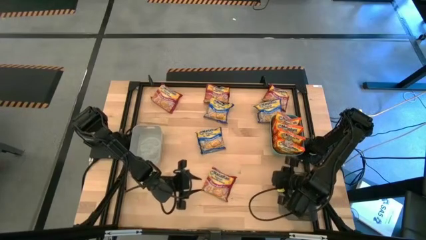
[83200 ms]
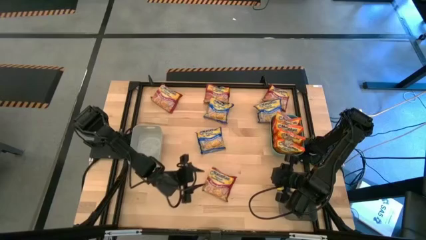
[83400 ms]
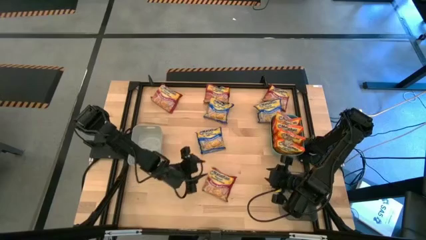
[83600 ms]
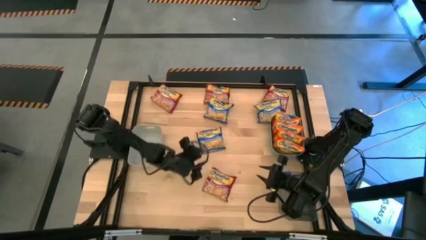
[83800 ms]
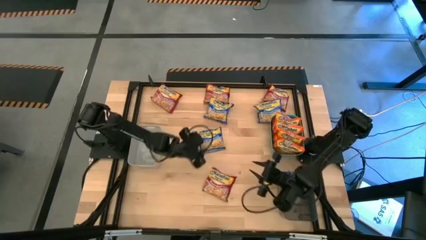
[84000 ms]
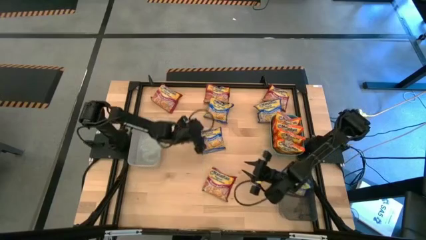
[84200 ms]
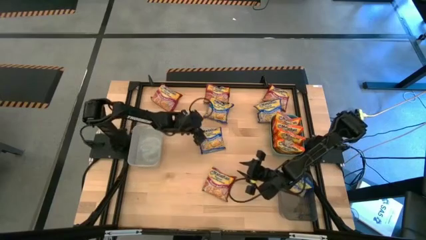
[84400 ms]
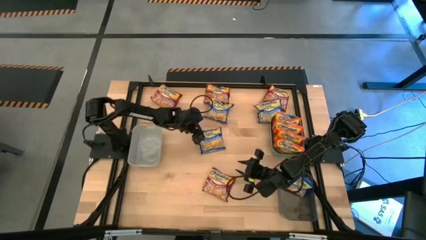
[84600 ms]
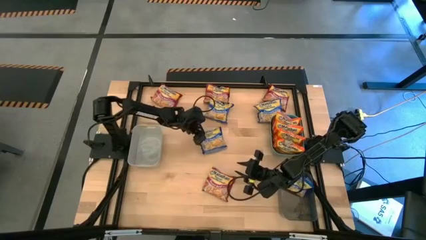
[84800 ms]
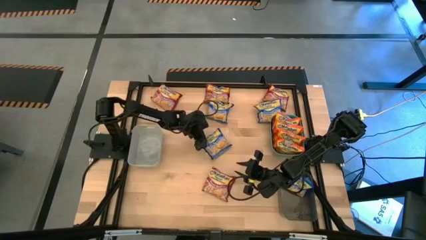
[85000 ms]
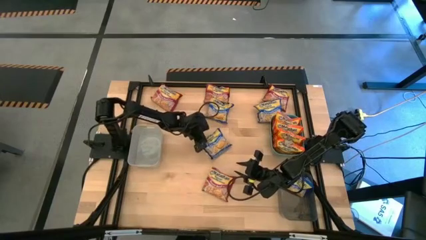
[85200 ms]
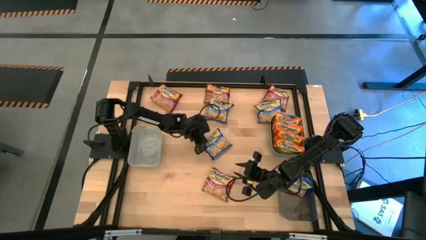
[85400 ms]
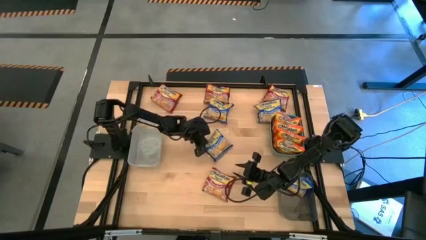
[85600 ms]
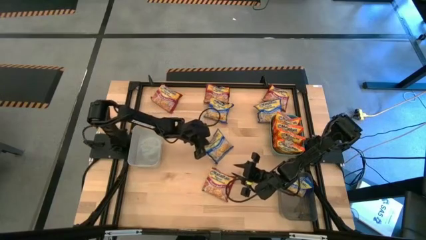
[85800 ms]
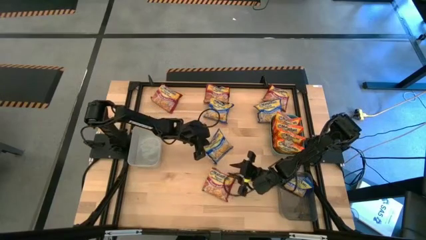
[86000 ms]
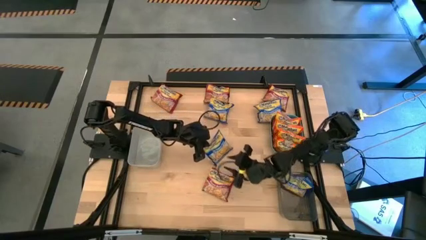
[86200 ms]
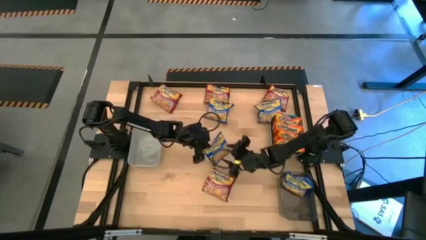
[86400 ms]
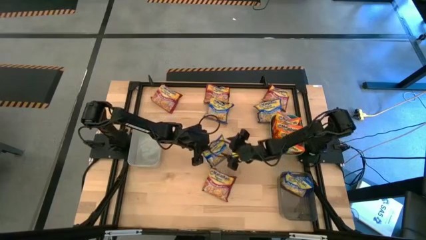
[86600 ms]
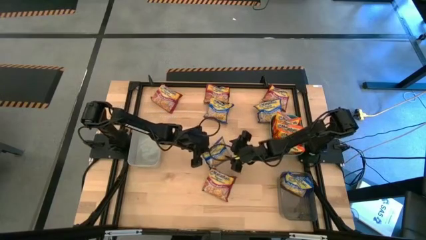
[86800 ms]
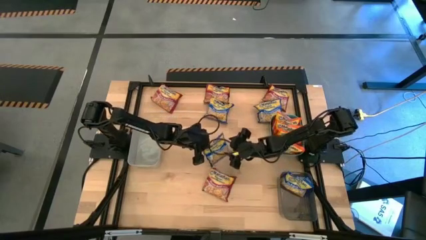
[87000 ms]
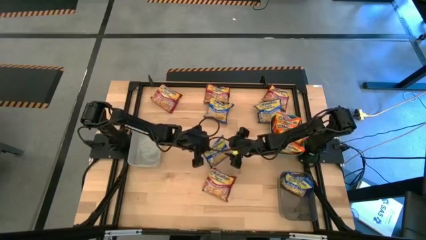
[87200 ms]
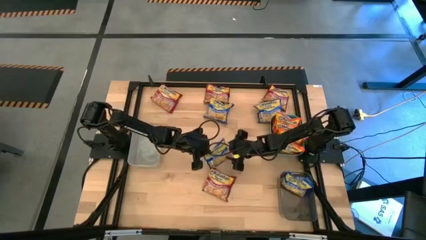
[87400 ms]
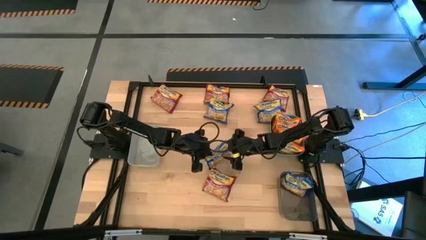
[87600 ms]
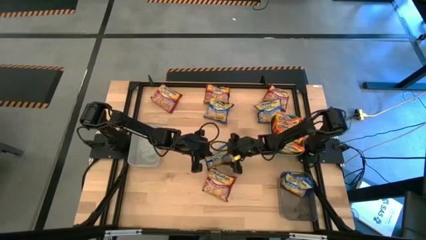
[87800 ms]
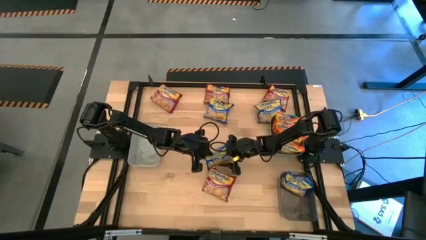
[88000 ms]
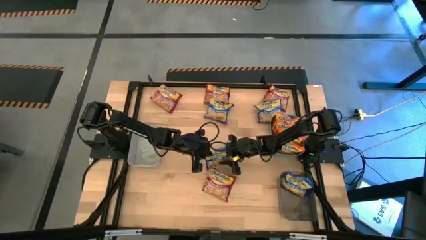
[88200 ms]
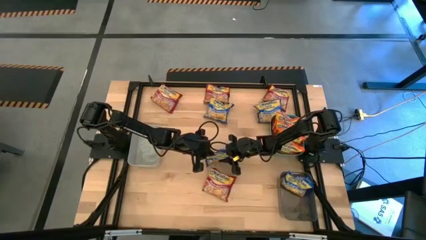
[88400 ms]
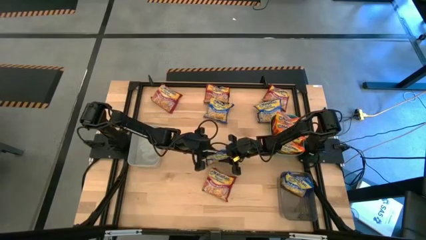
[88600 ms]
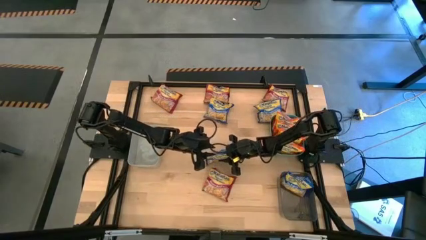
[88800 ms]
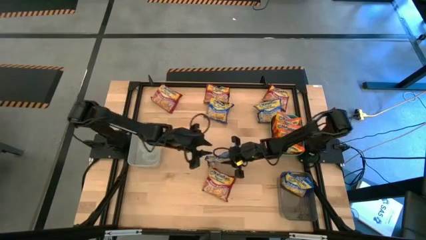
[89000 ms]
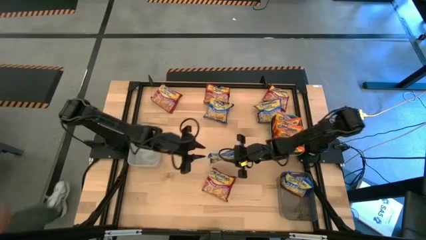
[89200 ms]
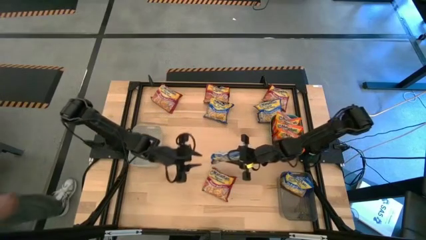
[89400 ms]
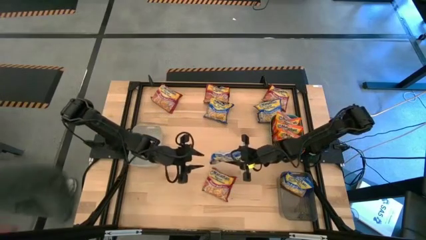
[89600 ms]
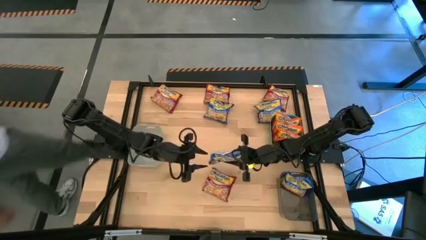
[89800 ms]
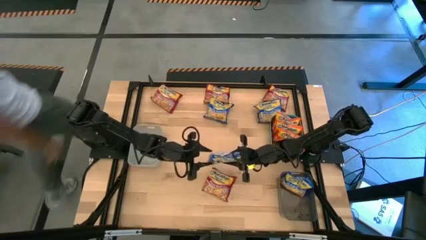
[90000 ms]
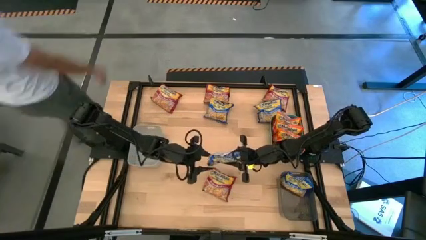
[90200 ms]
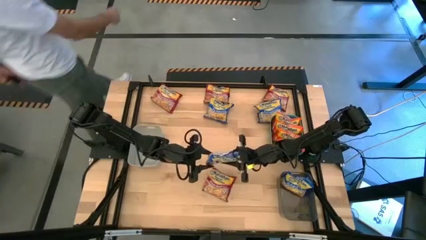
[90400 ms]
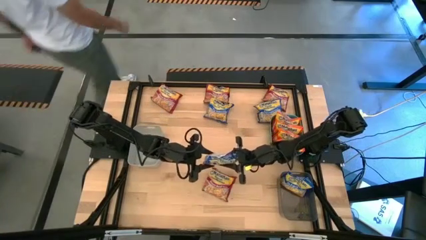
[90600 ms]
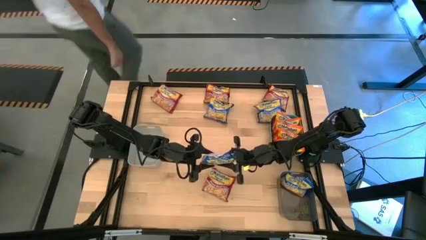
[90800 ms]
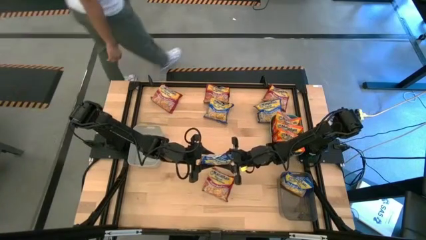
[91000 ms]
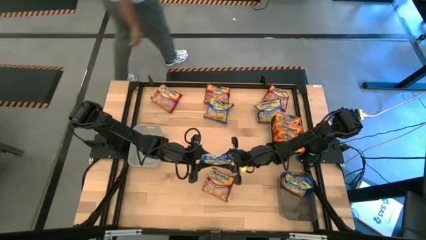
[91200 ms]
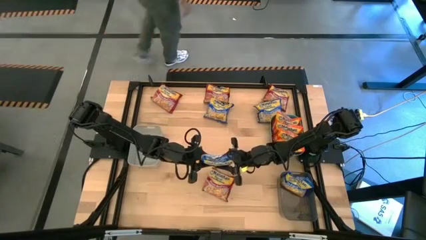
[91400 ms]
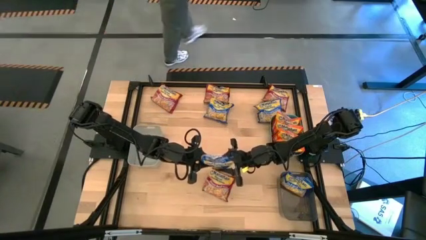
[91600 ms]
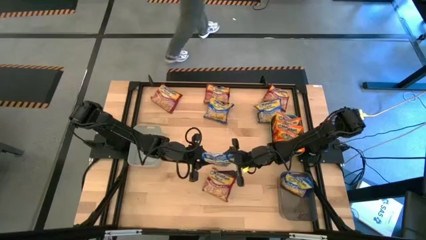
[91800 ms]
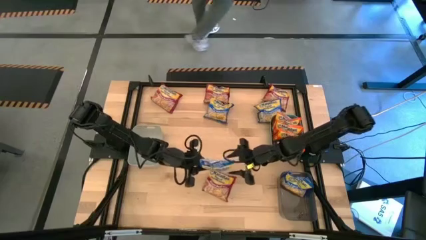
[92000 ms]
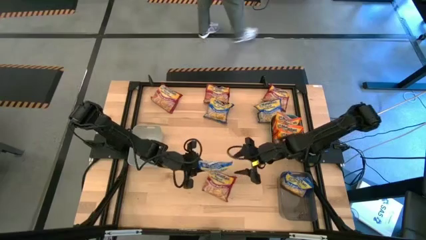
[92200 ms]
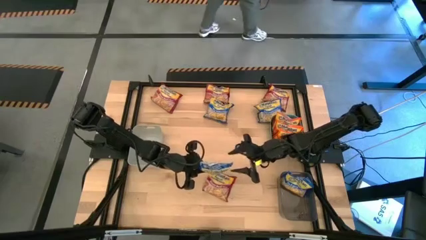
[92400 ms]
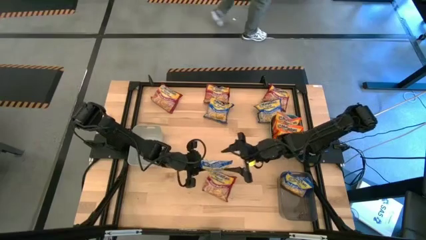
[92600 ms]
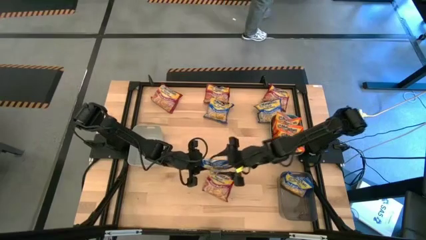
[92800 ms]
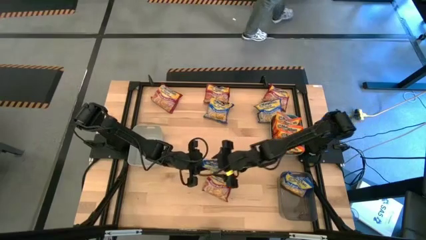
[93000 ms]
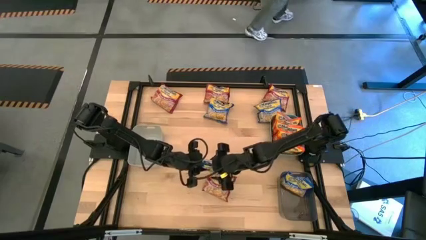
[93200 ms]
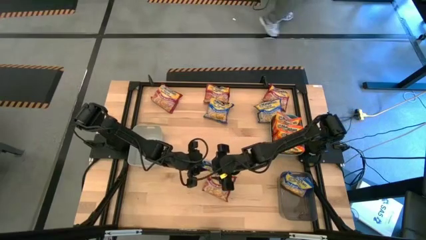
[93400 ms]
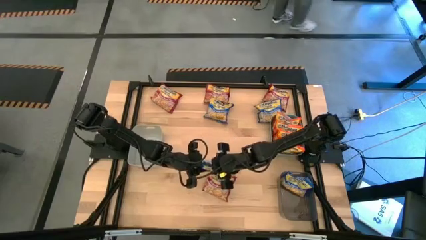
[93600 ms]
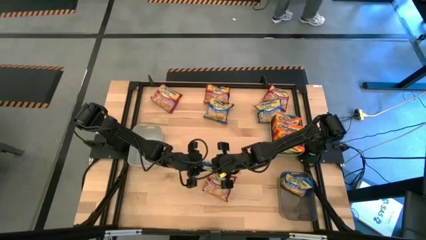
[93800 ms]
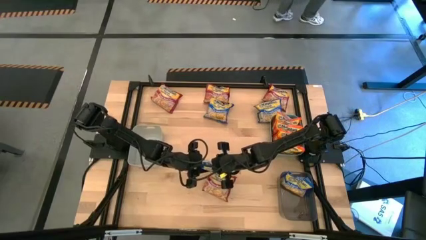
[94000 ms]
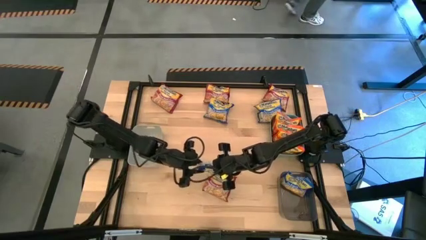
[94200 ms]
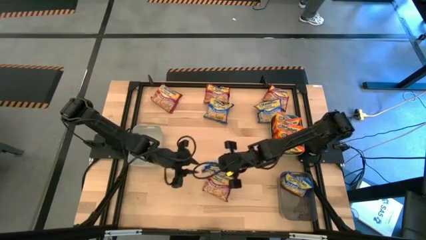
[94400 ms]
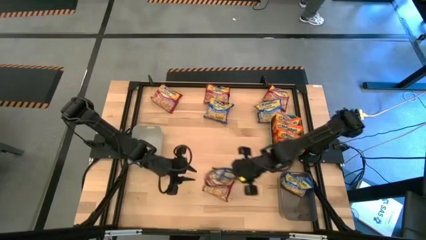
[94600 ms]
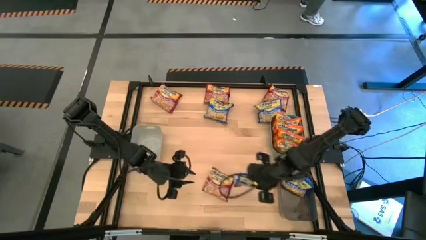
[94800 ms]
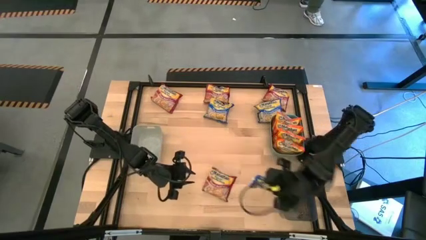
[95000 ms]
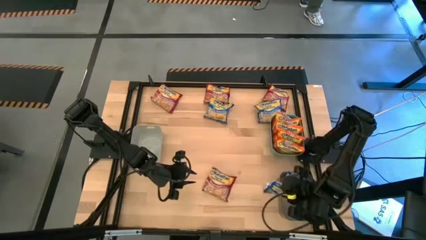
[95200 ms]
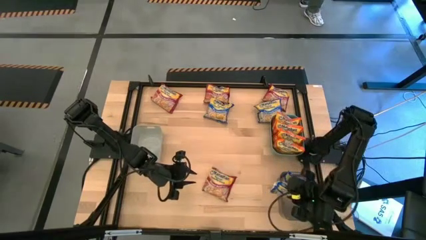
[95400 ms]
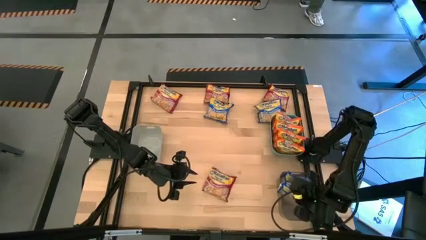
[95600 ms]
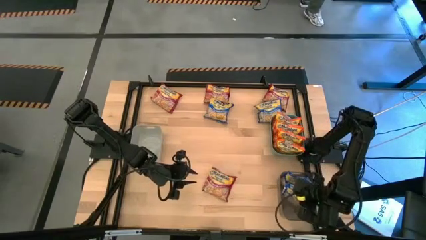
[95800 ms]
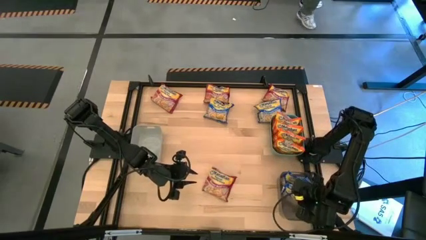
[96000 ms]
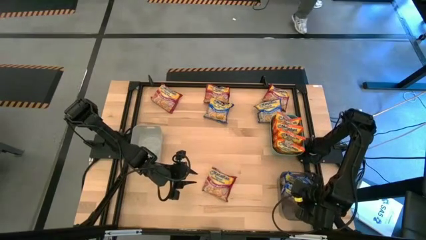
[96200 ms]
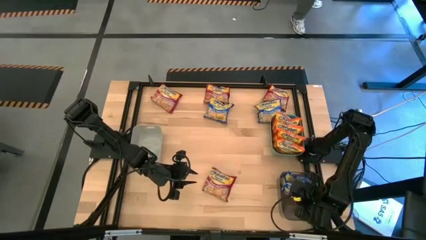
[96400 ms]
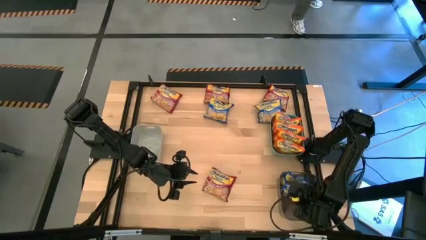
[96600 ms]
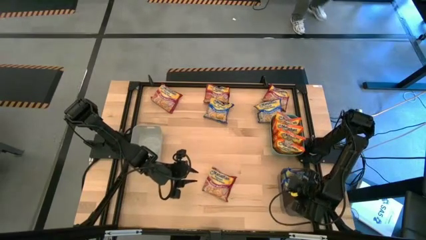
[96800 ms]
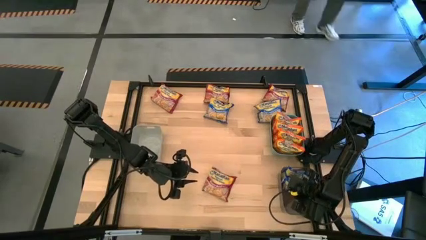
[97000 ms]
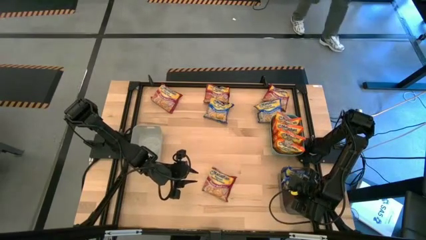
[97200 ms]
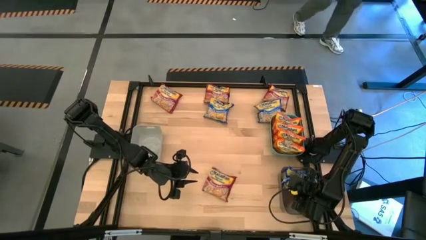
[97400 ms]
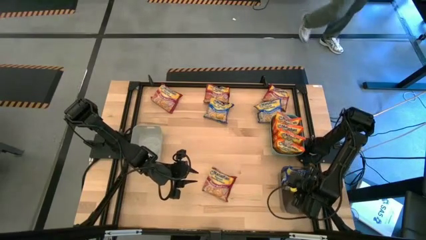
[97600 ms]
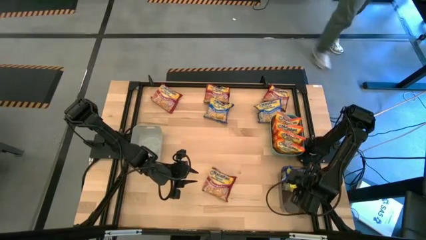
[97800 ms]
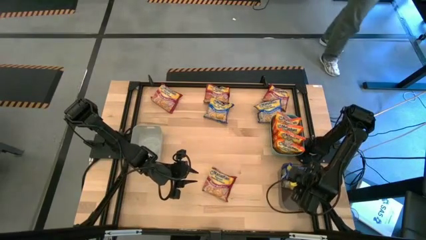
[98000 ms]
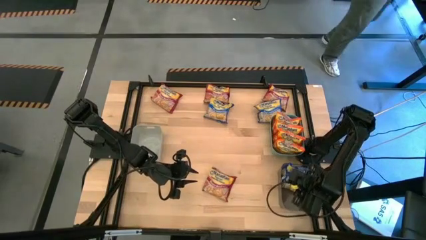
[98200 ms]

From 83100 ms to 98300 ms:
Task: Sort Maruchan noodles
Put the blue noodle pack into the black bin

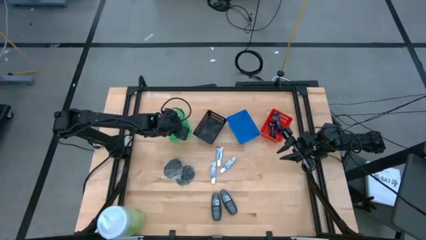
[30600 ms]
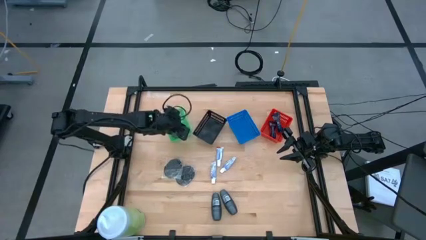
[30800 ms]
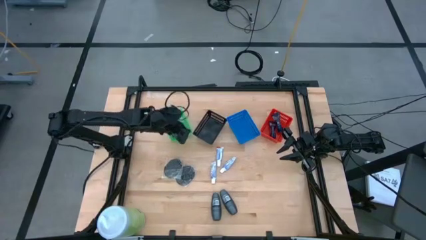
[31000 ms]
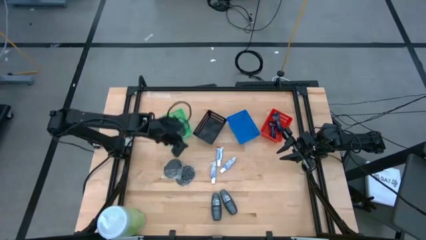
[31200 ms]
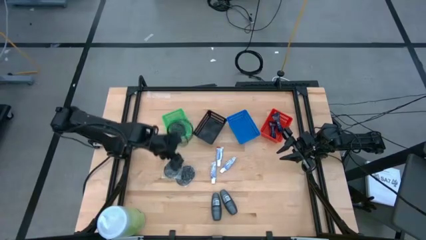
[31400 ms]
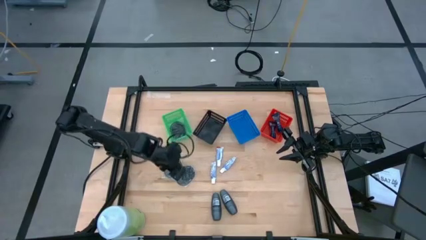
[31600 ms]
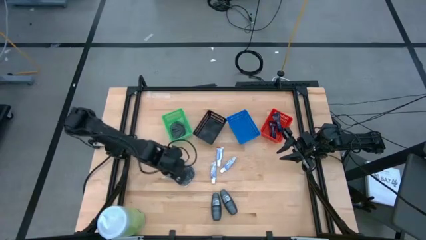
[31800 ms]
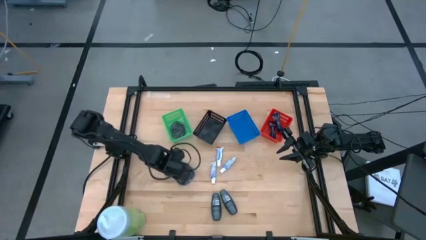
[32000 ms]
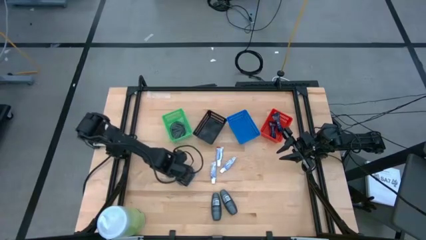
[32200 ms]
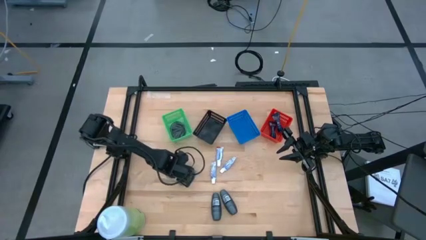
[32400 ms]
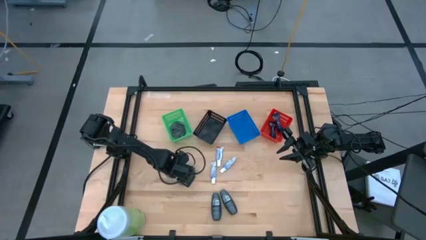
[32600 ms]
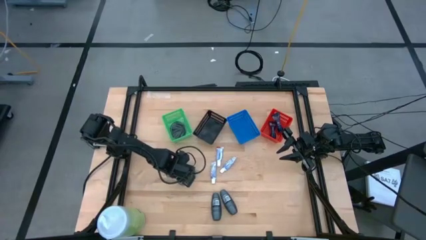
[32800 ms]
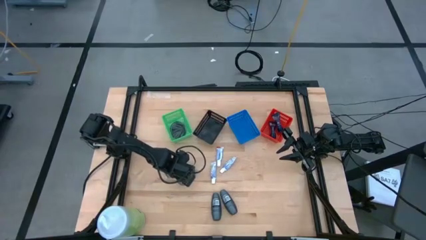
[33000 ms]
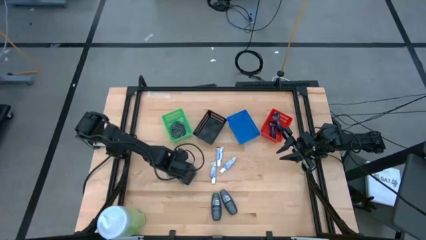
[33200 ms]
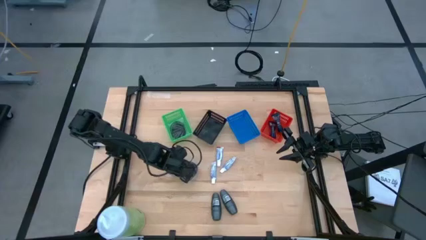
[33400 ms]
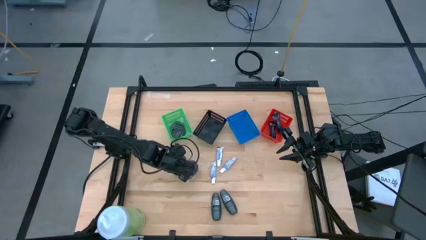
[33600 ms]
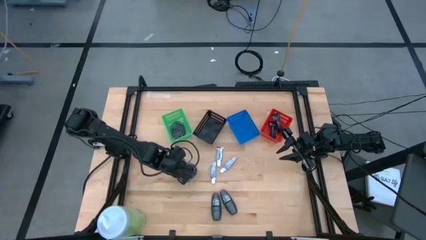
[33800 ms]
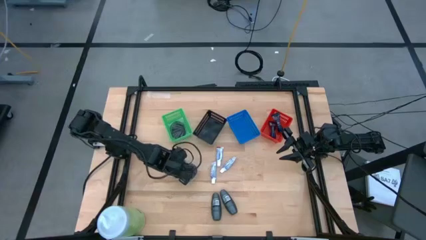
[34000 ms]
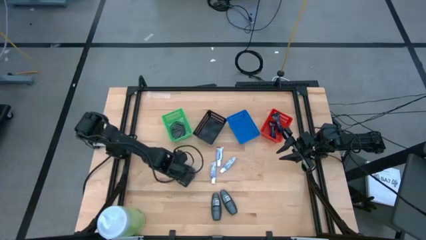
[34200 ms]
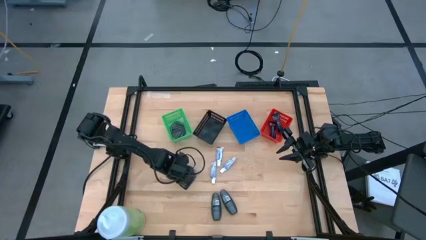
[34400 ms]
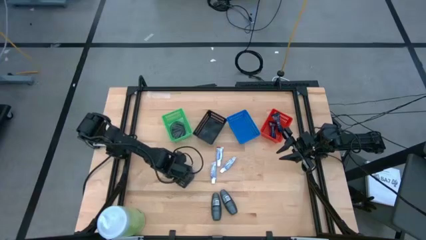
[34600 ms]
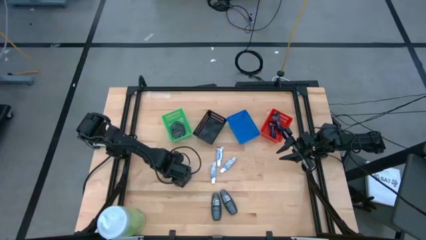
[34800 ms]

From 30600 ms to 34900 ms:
Task: Pick & Place Travel size toiletries
Put the left black hairbrush into the green bin
